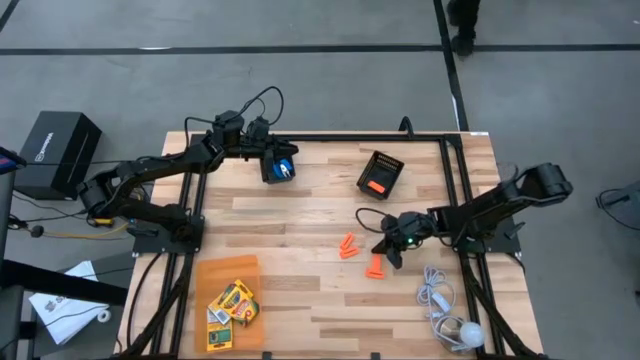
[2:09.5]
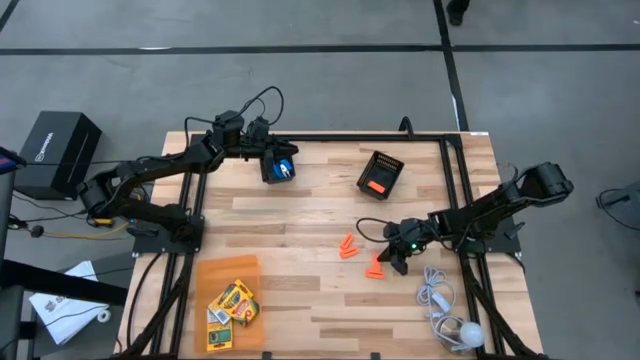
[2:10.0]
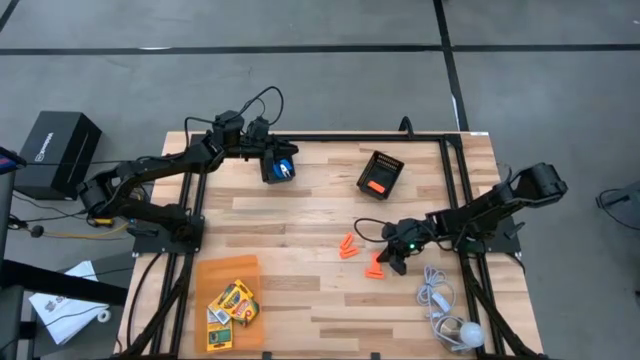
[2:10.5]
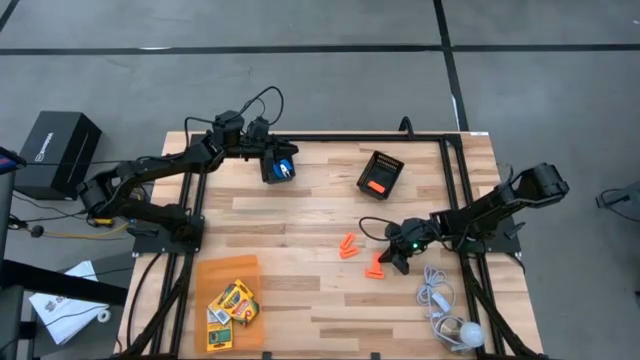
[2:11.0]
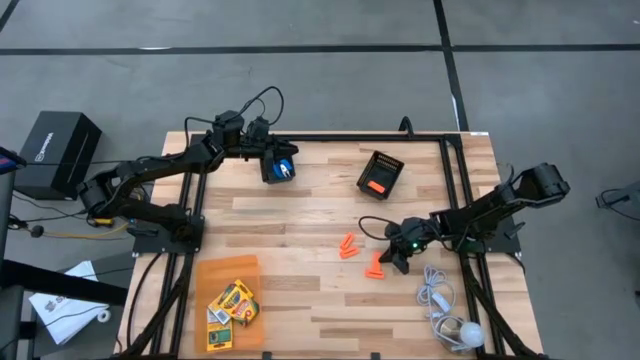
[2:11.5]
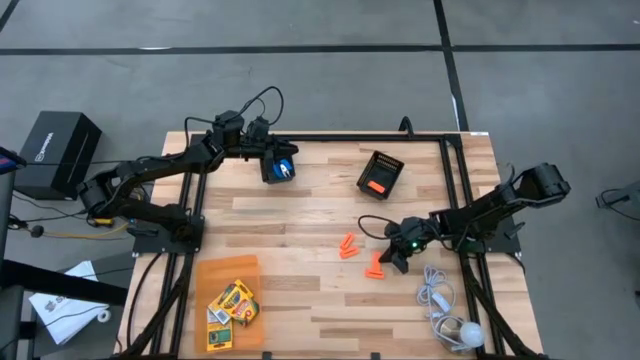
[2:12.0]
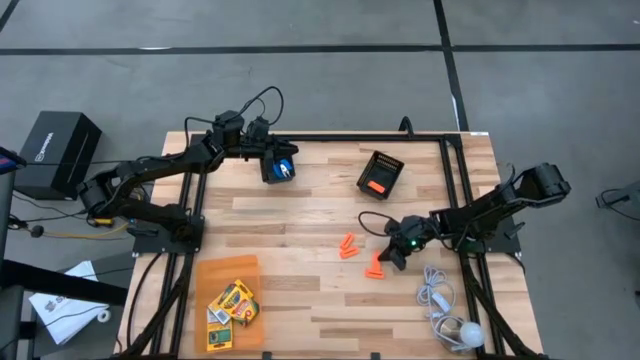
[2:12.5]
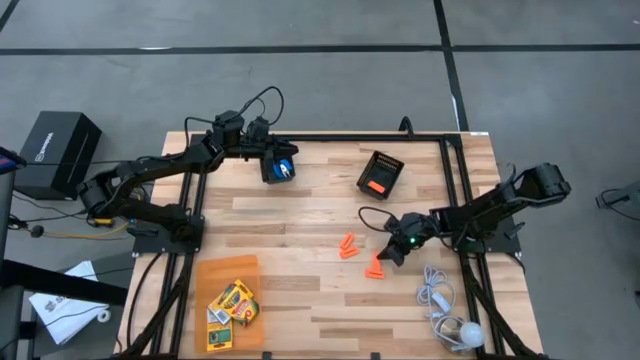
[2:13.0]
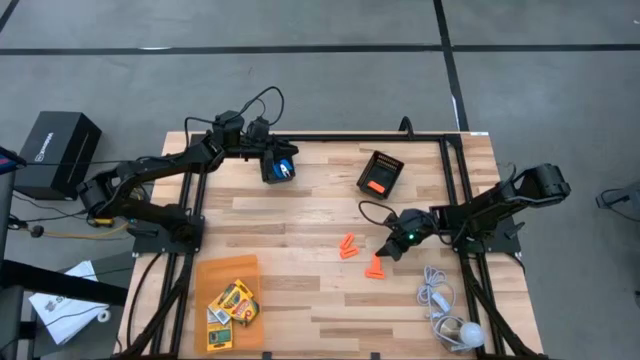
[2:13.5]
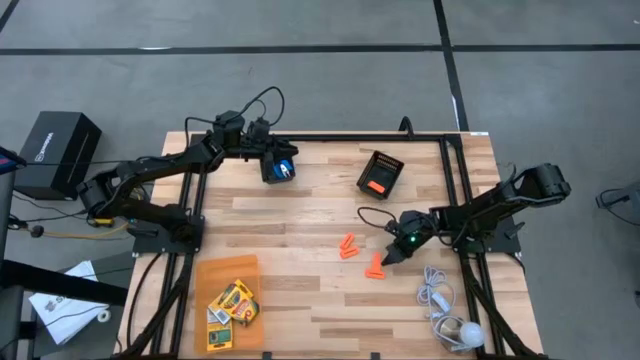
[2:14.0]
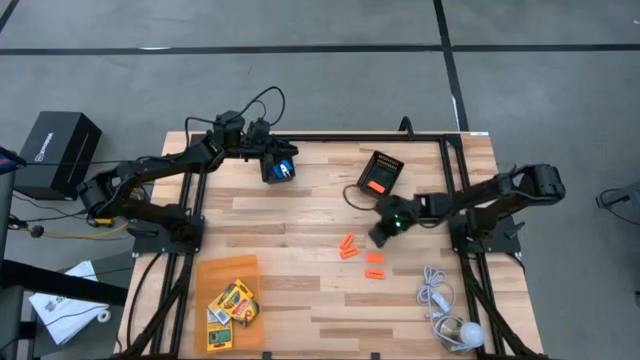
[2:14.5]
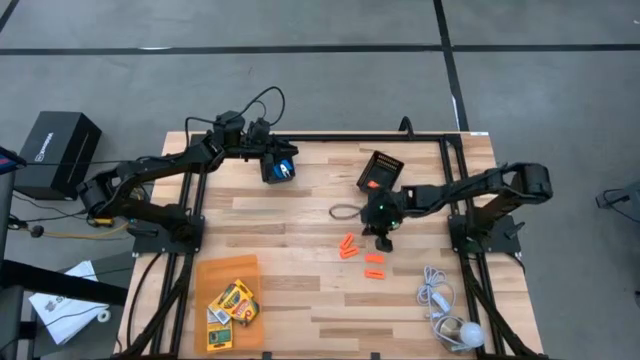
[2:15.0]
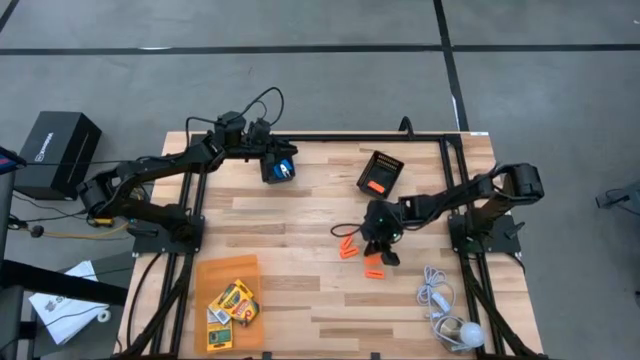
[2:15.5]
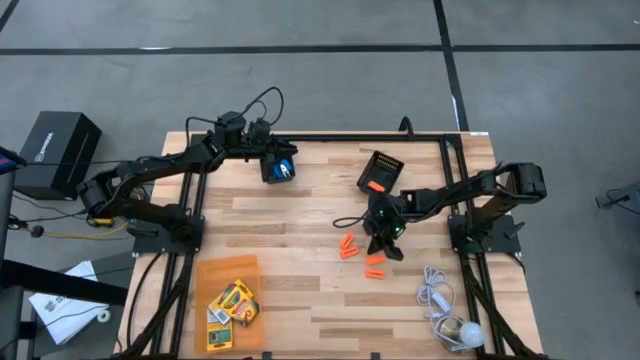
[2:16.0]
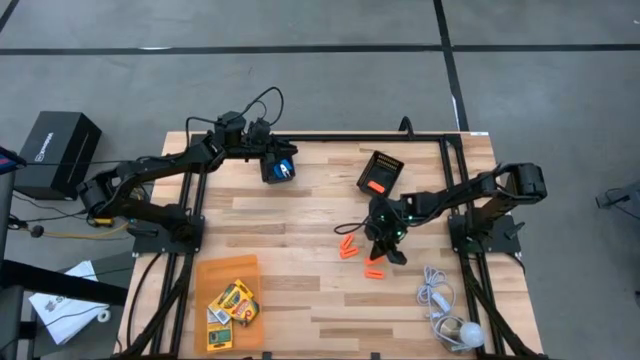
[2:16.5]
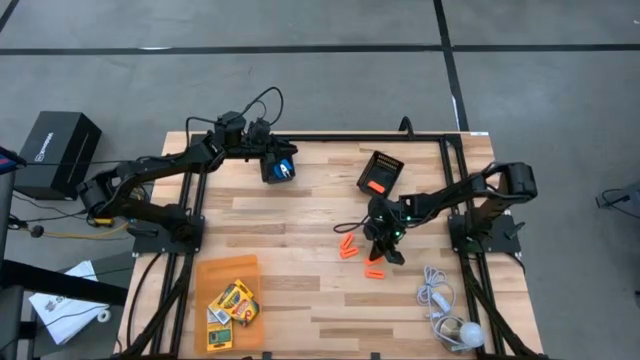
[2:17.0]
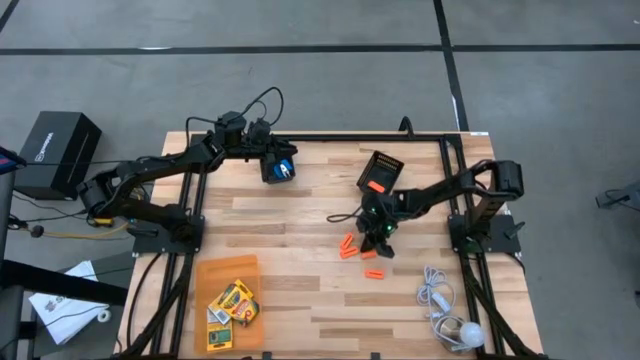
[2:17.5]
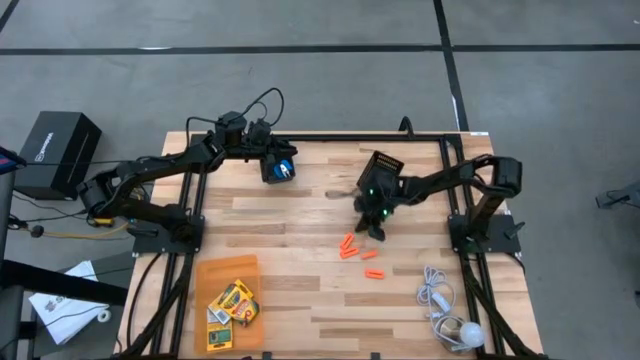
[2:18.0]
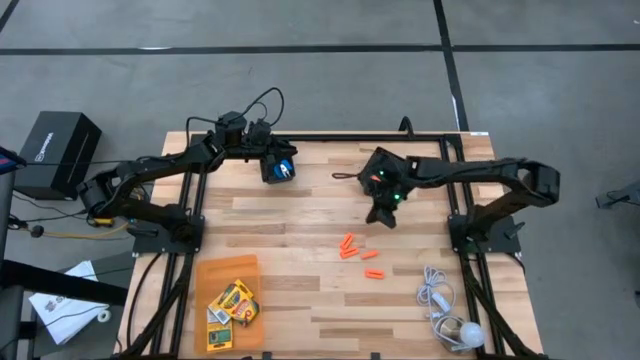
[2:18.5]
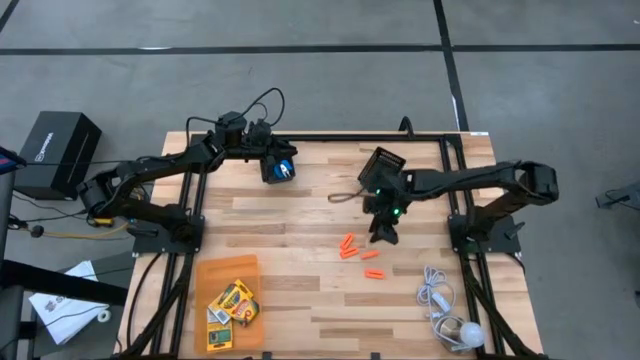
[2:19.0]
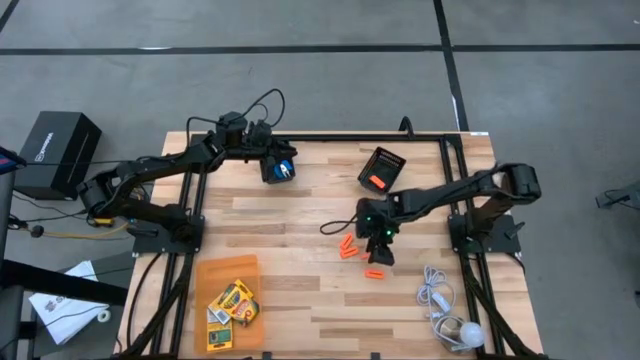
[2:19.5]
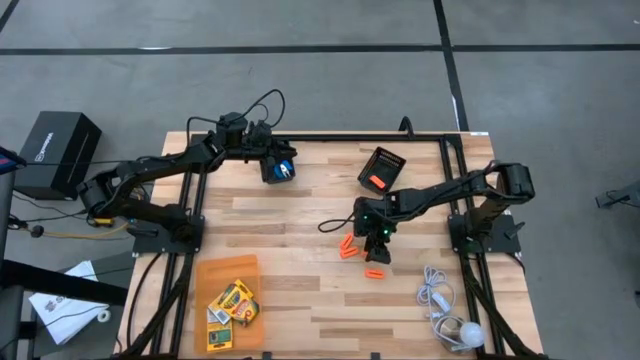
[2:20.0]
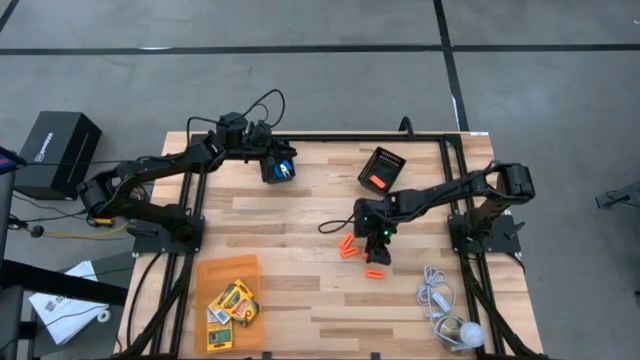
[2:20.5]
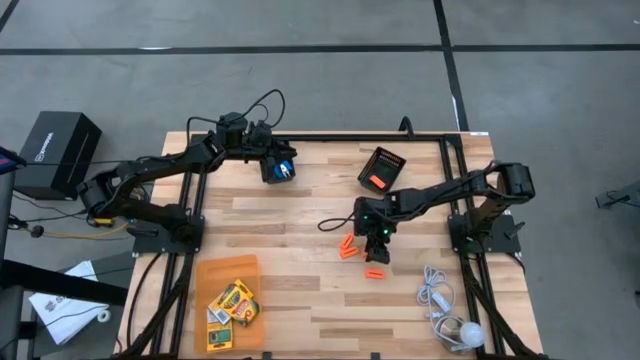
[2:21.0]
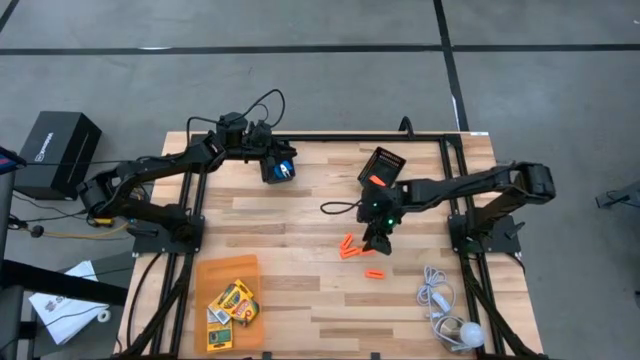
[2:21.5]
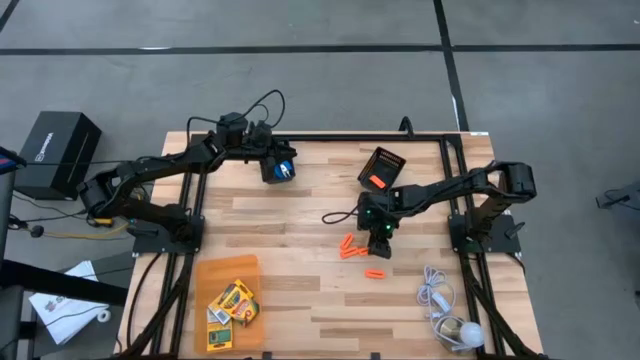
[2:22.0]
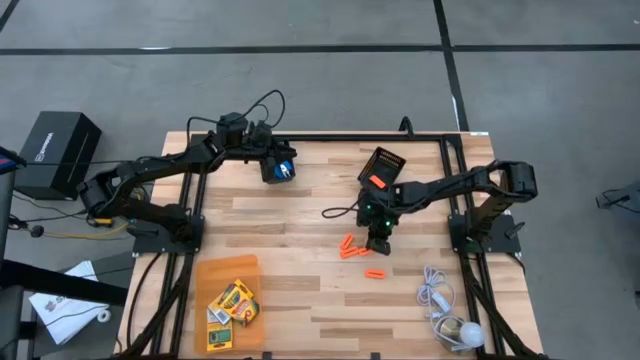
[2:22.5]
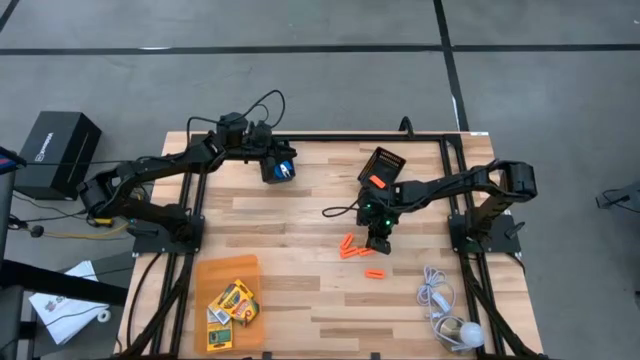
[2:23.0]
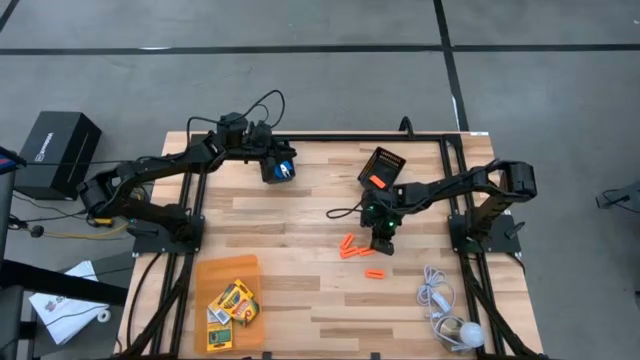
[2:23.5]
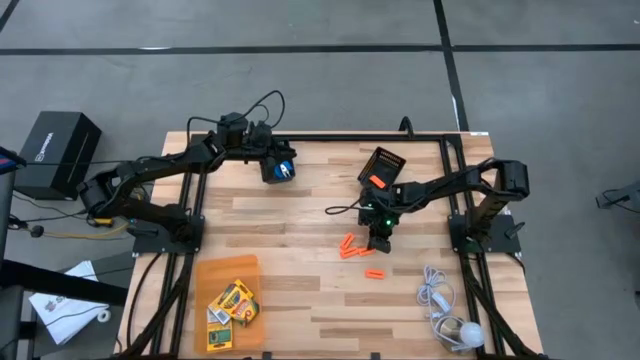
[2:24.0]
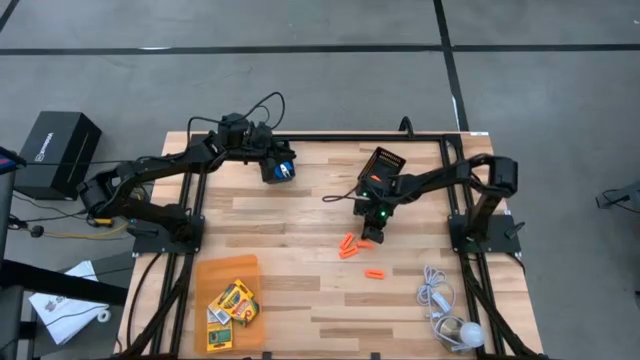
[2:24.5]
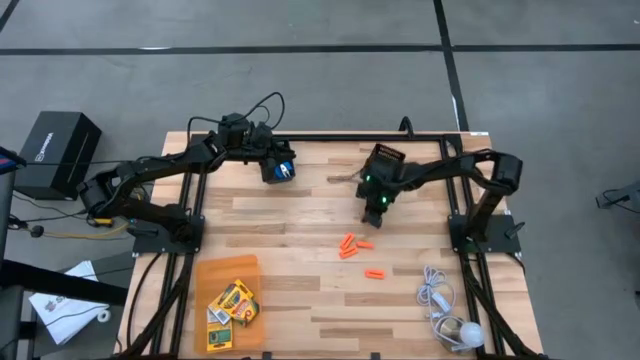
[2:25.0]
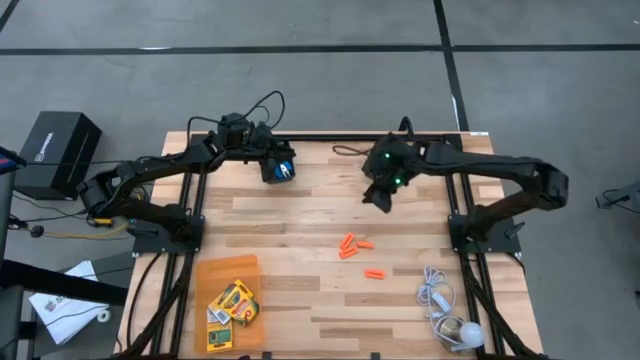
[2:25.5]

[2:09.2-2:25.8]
Task: Pick & Place School Supplies
Put the orange eraser into the right black bin

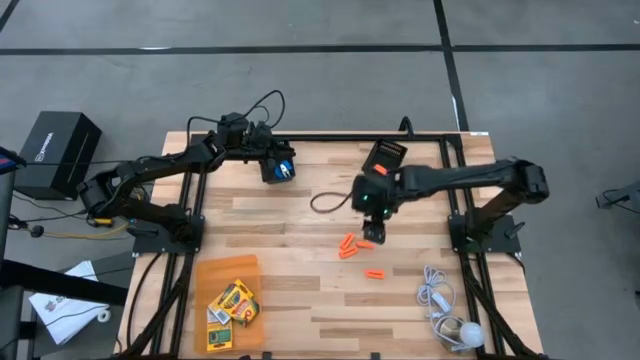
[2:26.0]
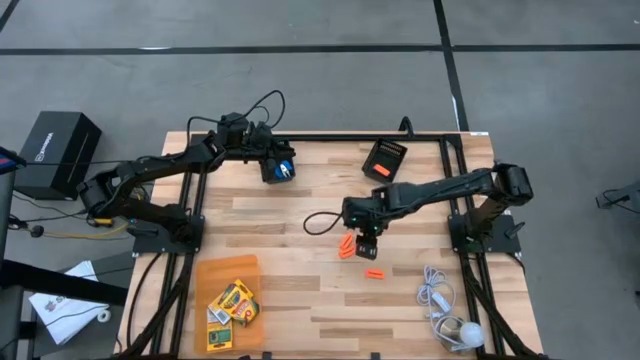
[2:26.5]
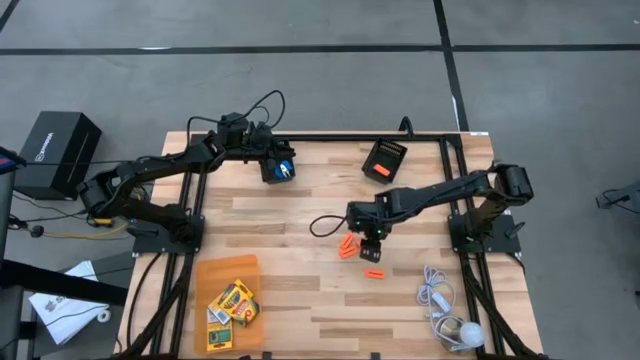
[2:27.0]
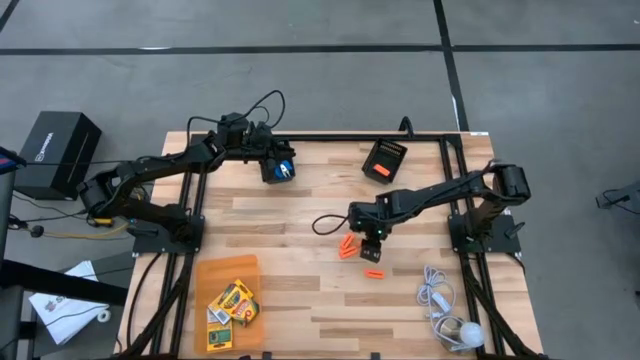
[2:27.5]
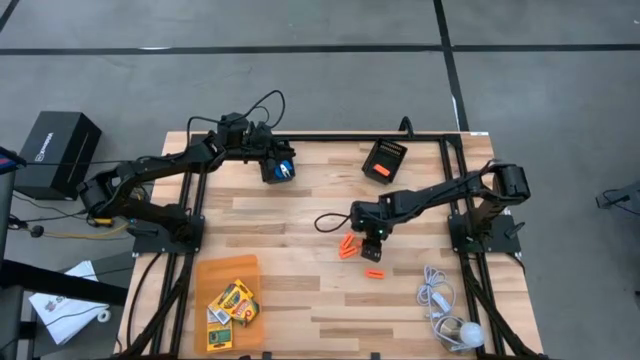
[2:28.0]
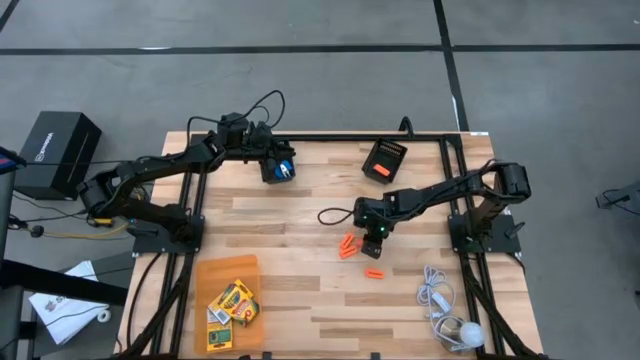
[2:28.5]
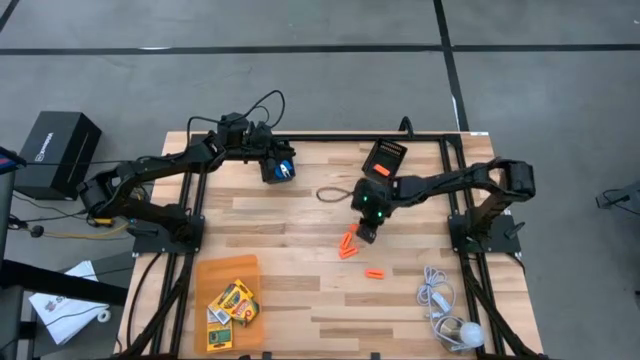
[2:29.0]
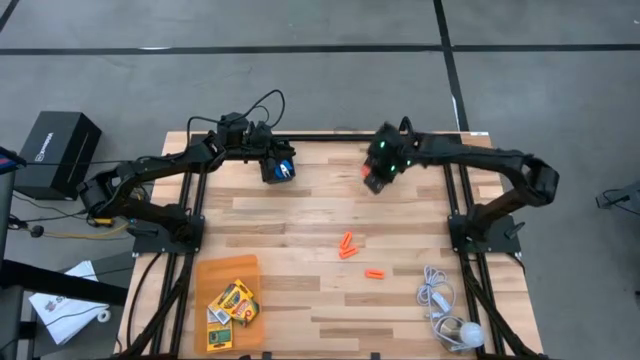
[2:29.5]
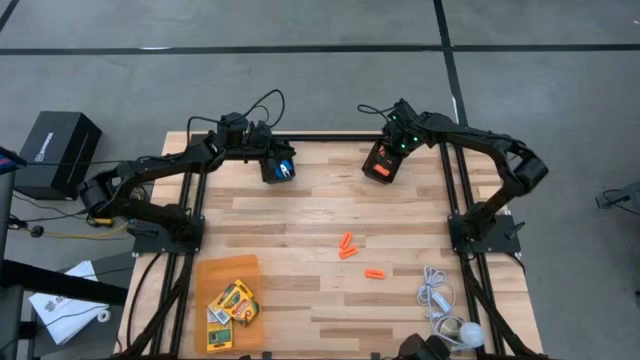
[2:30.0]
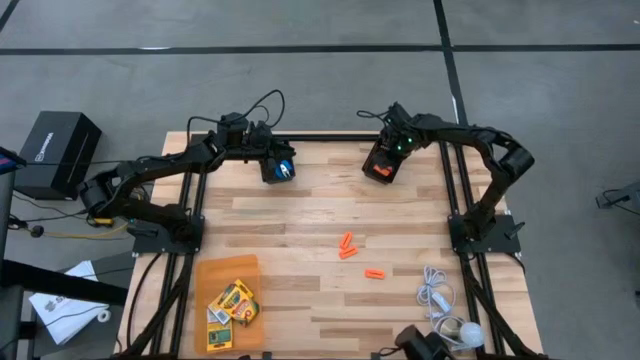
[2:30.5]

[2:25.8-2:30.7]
Put the orange eraser into the right black bin

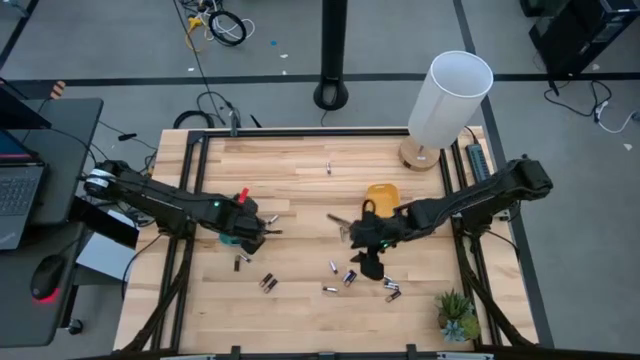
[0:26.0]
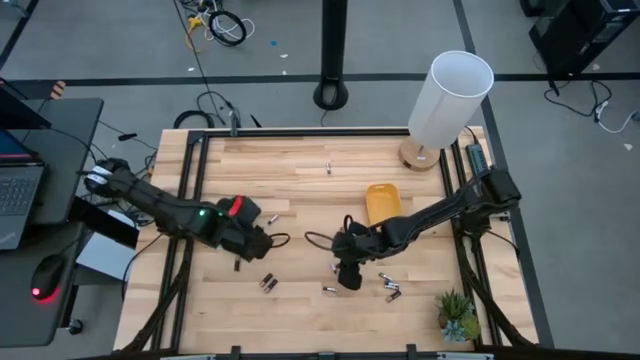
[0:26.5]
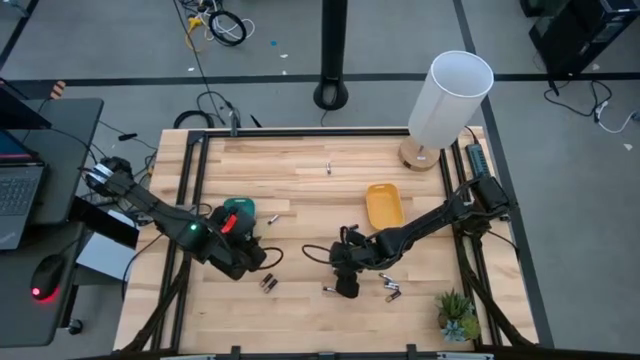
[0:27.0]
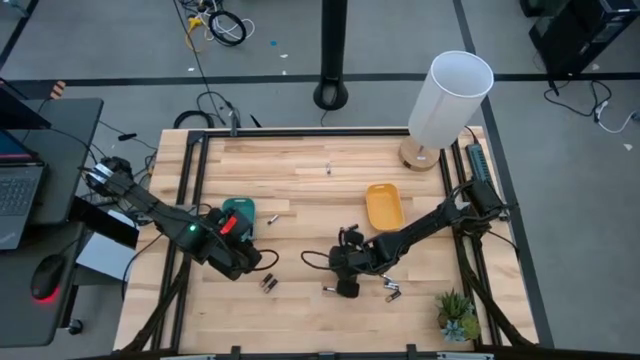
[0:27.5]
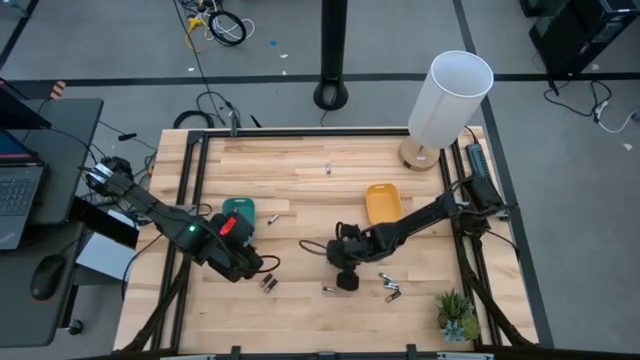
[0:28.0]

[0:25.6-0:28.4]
Task: Sort batteries
Put the silver battery into the yellow bin
